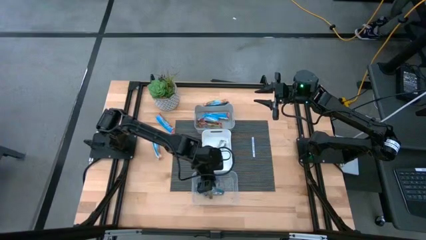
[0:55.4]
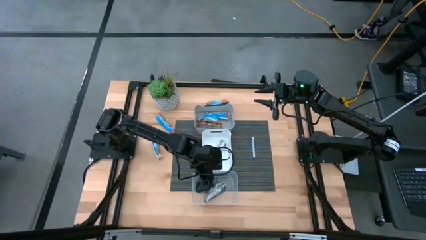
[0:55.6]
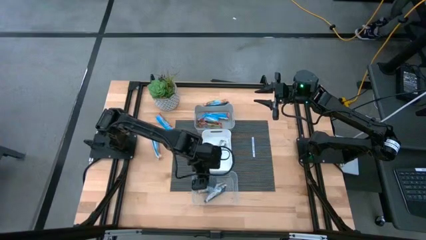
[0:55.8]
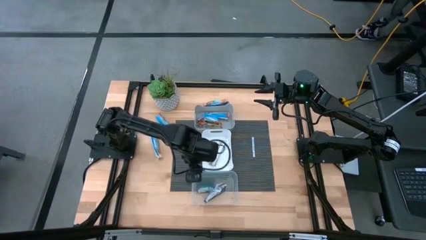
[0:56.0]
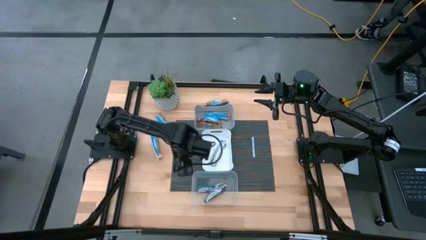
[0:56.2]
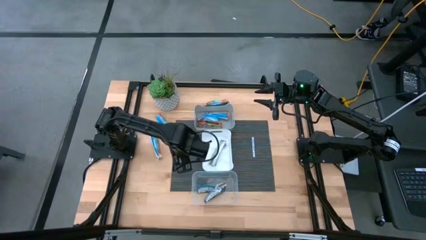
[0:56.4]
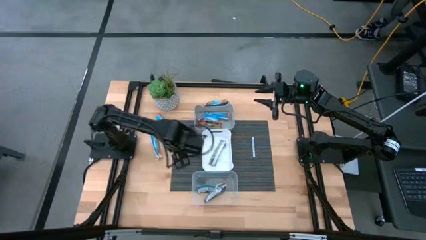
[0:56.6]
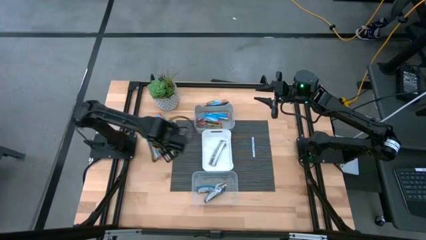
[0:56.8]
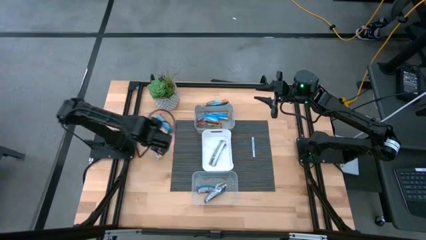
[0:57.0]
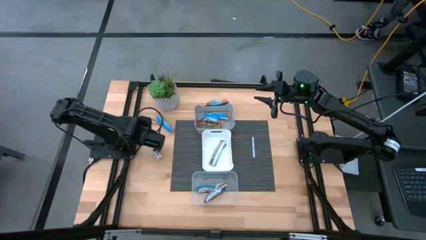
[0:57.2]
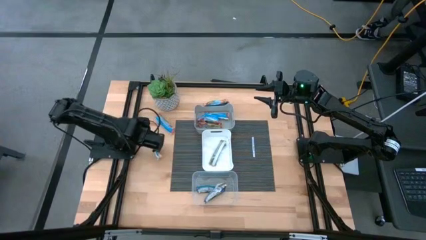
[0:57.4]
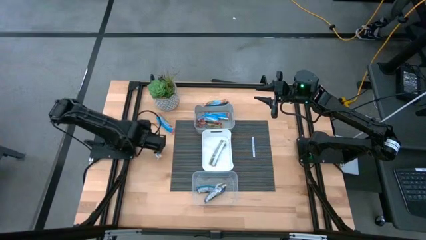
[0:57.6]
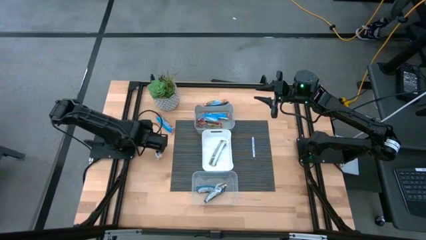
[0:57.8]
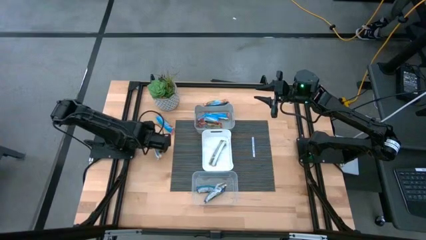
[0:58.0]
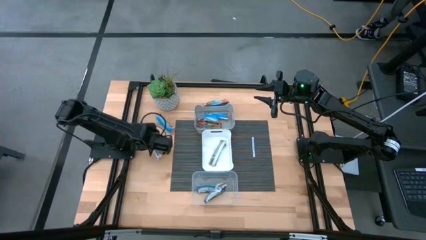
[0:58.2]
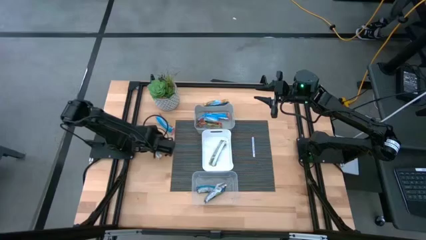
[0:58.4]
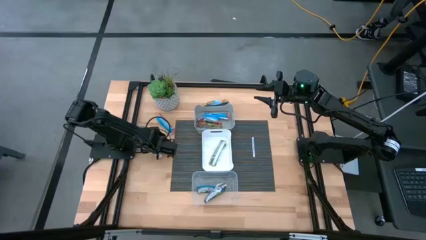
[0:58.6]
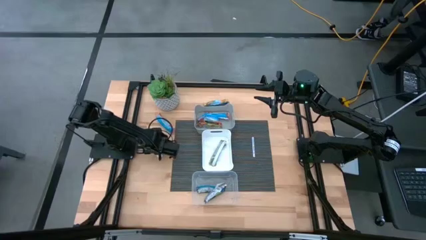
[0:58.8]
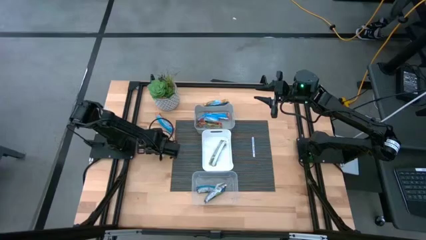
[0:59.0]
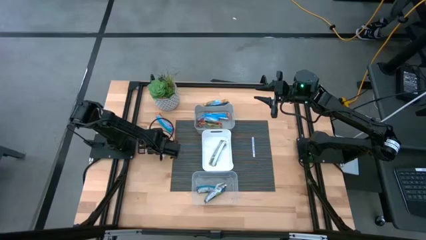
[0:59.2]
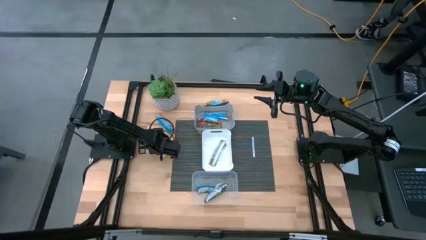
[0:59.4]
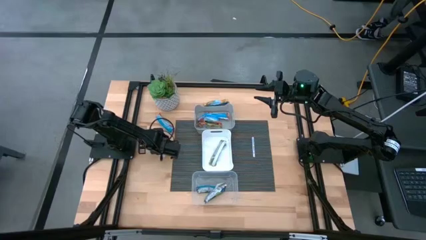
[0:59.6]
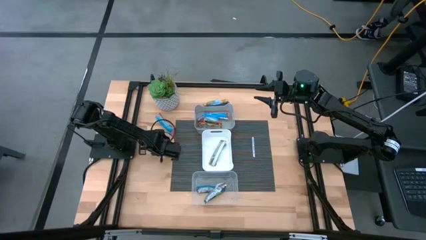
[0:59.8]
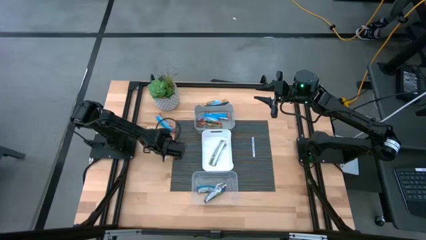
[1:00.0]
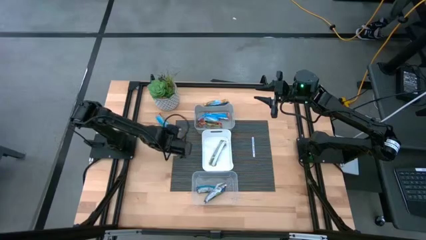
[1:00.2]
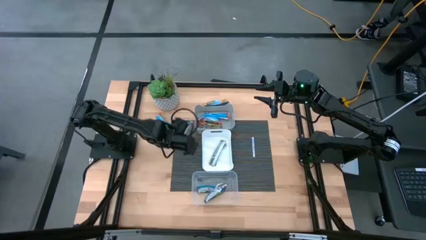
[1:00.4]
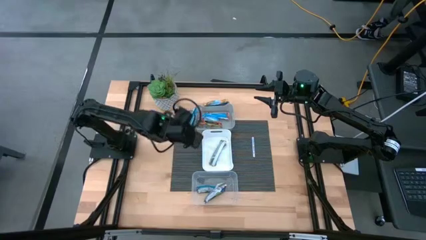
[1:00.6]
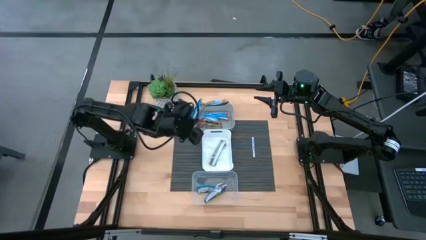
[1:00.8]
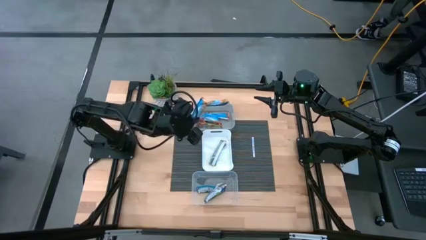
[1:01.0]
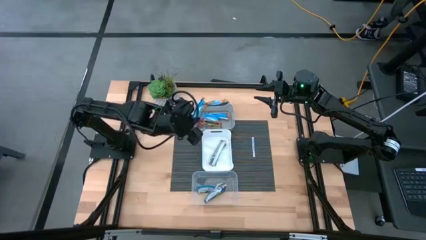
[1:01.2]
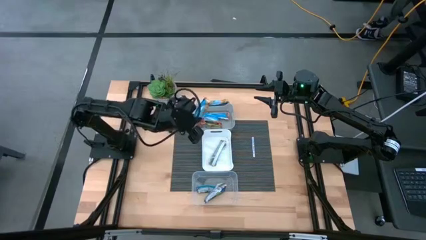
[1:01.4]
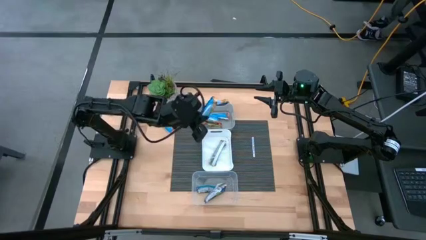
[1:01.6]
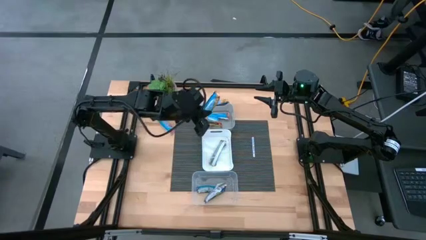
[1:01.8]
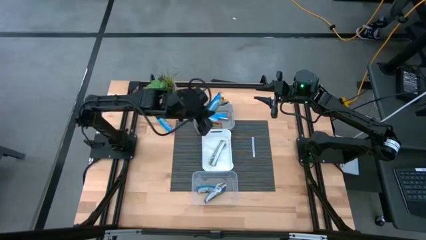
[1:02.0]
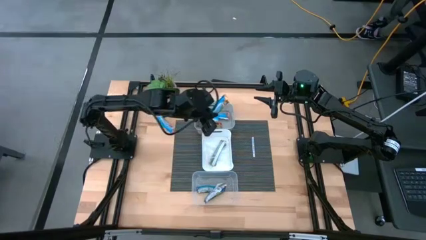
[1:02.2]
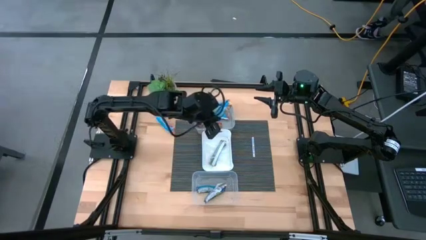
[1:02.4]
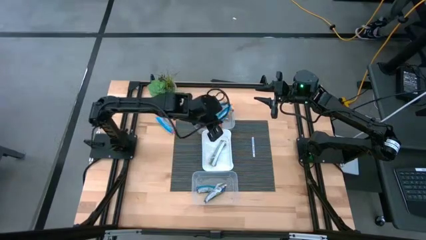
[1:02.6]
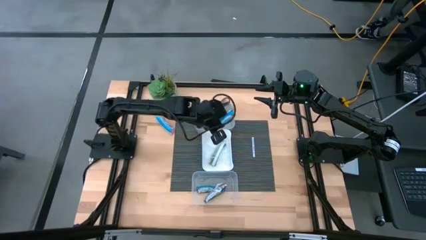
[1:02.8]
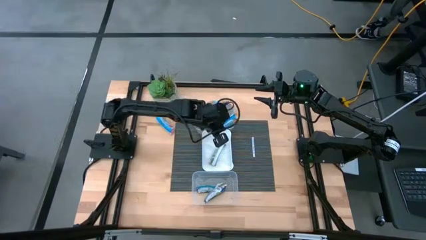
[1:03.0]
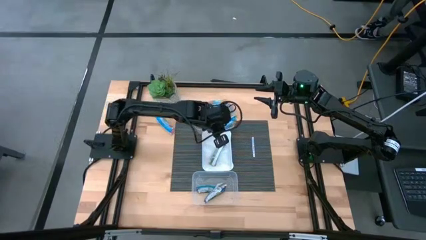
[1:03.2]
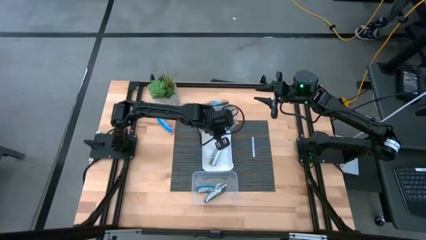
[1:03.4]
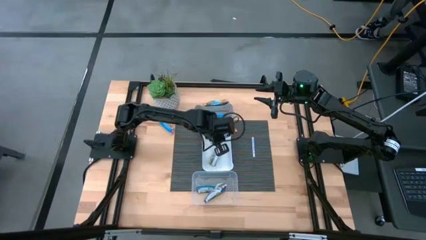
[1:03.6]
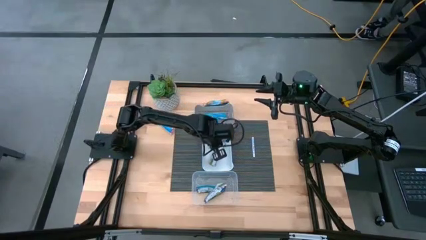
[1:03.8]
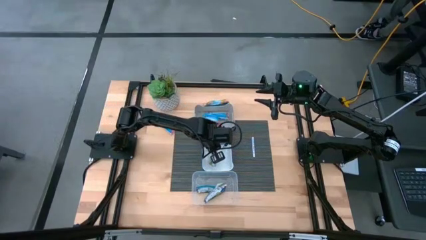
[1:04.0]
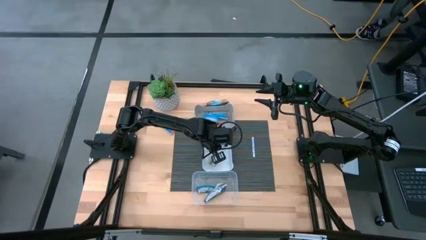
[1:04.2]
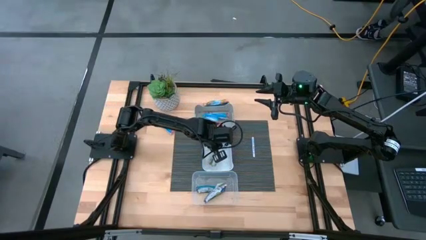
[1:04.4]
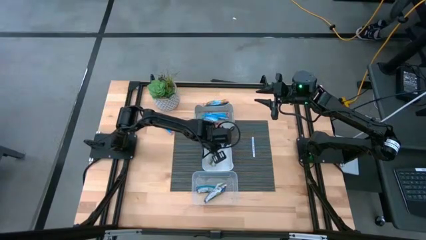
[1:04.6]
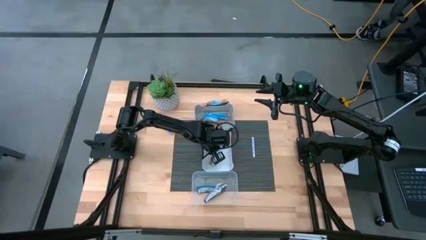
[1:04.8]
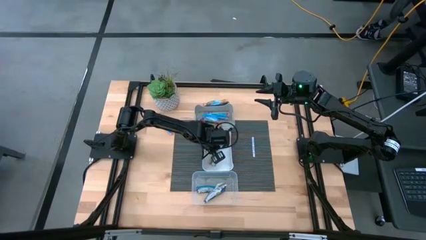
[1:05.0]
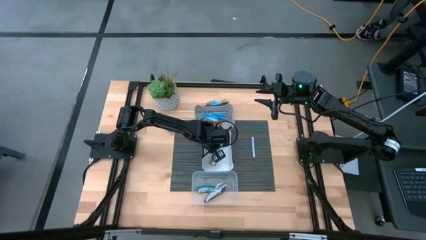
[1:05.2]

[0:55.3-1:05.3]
Task: Pick and place Granola Bars by type
Put the bottom orange granola bar into the white bin

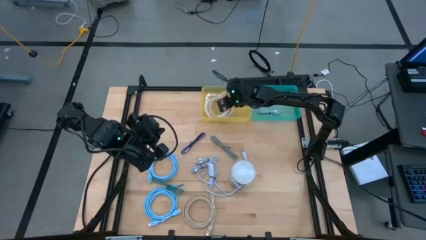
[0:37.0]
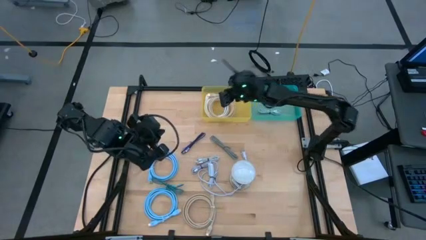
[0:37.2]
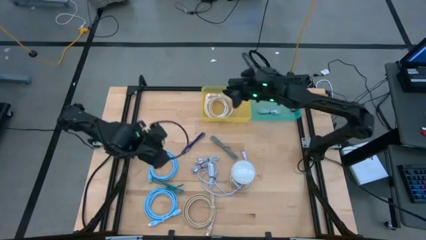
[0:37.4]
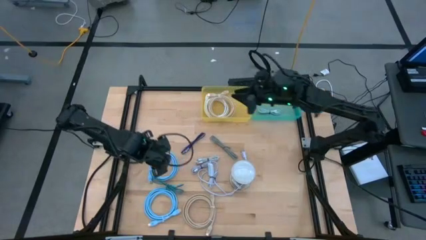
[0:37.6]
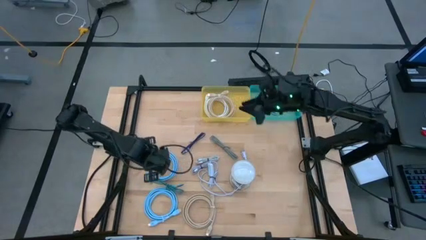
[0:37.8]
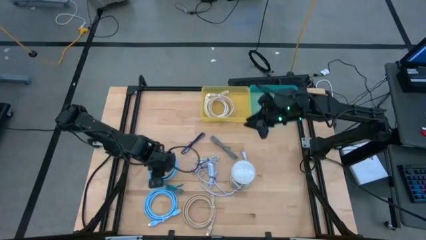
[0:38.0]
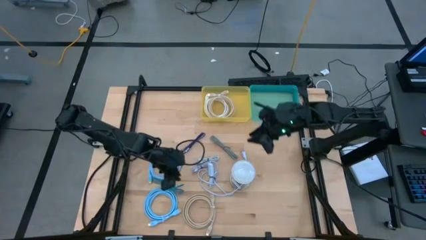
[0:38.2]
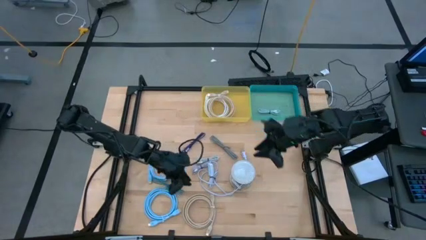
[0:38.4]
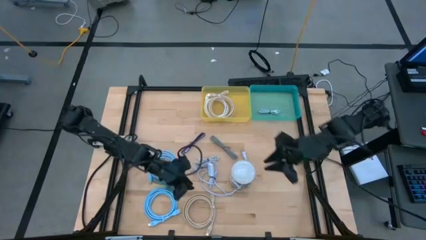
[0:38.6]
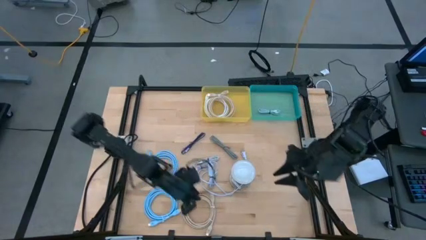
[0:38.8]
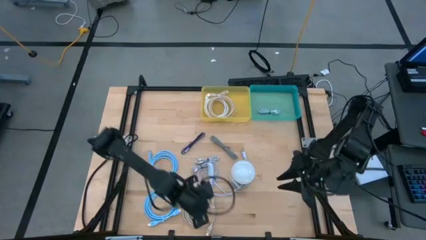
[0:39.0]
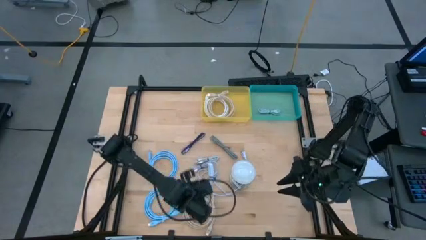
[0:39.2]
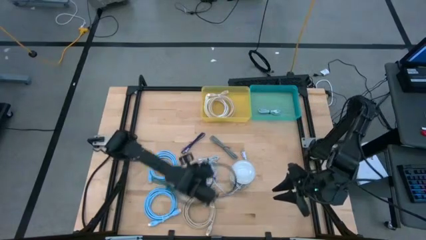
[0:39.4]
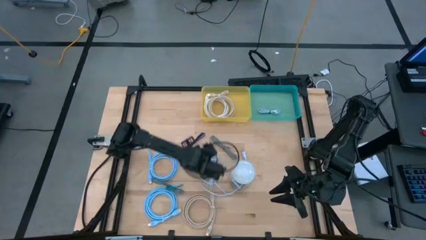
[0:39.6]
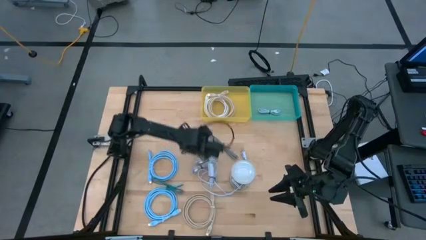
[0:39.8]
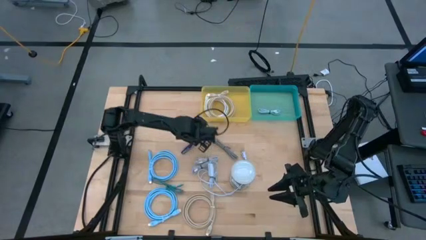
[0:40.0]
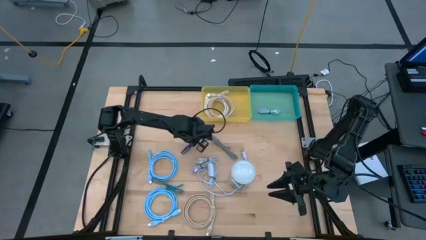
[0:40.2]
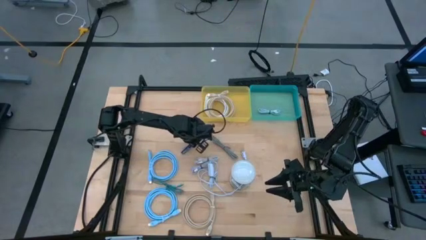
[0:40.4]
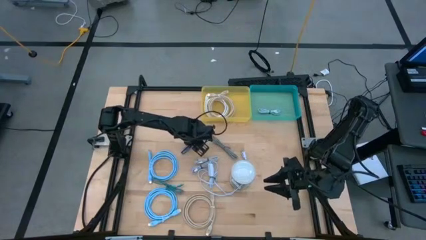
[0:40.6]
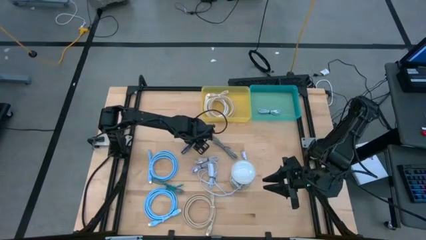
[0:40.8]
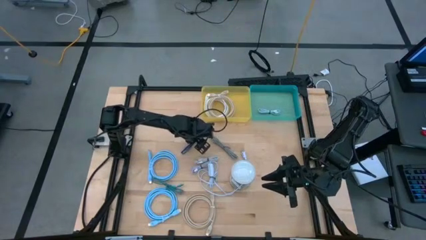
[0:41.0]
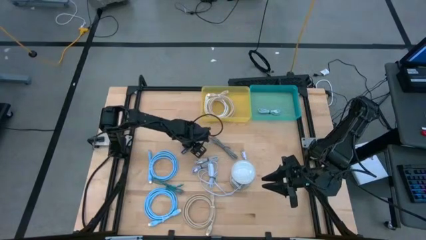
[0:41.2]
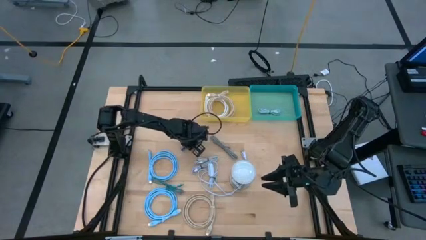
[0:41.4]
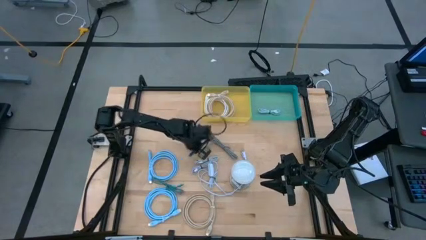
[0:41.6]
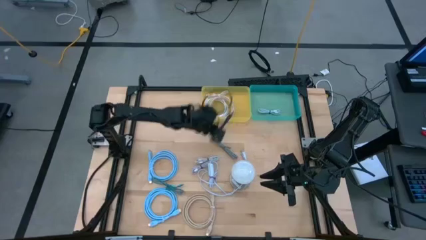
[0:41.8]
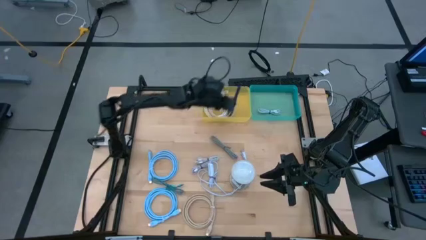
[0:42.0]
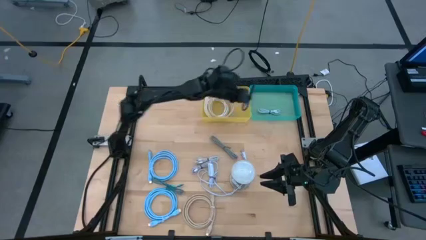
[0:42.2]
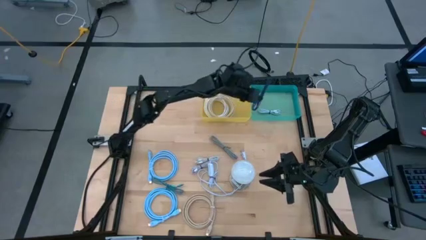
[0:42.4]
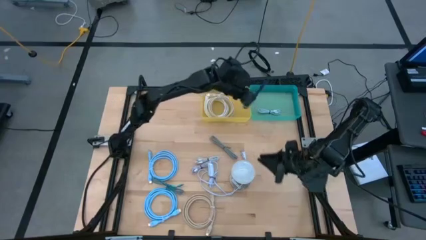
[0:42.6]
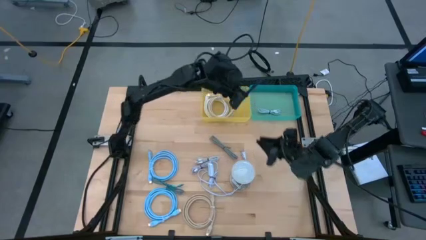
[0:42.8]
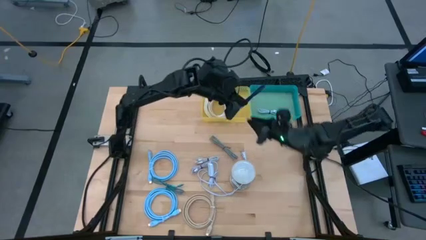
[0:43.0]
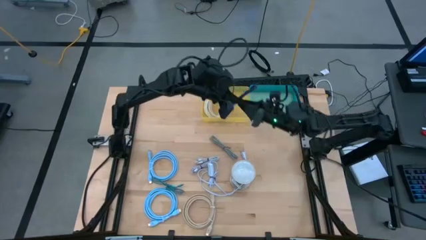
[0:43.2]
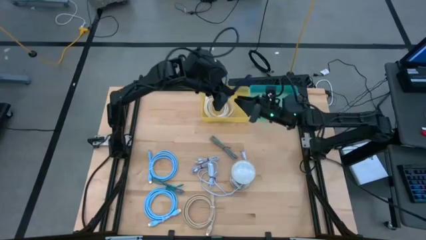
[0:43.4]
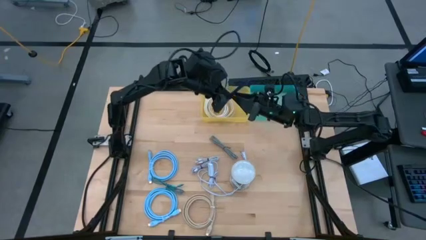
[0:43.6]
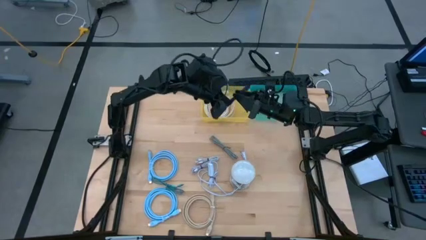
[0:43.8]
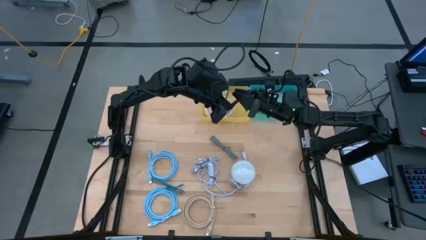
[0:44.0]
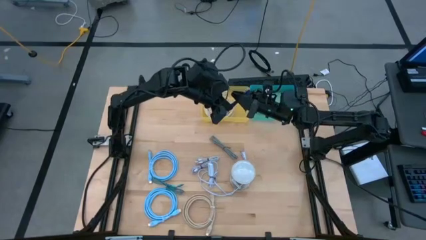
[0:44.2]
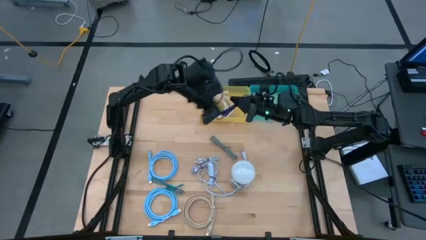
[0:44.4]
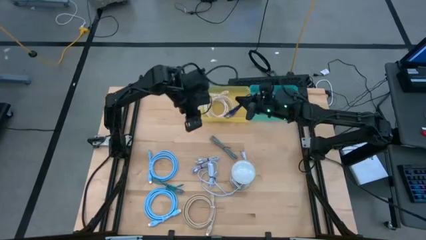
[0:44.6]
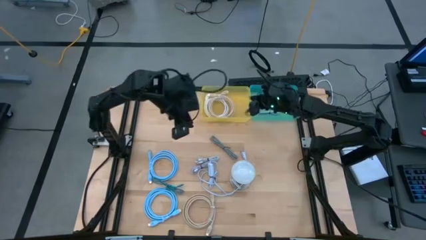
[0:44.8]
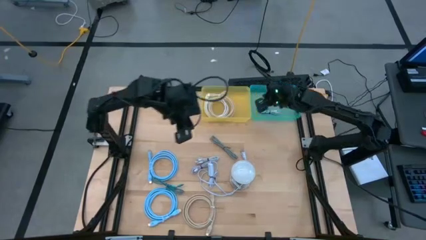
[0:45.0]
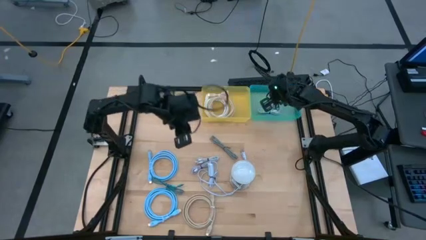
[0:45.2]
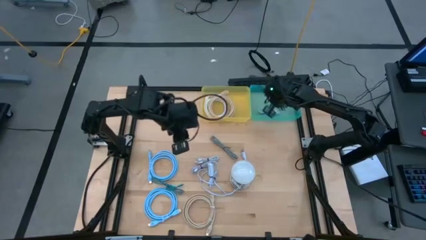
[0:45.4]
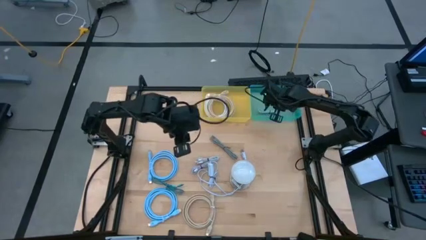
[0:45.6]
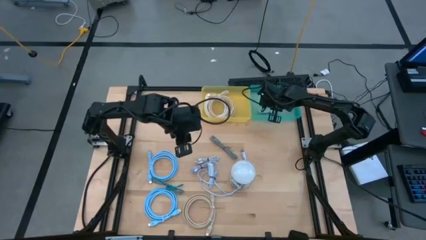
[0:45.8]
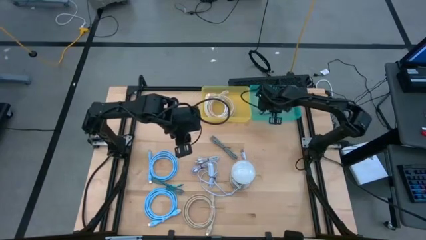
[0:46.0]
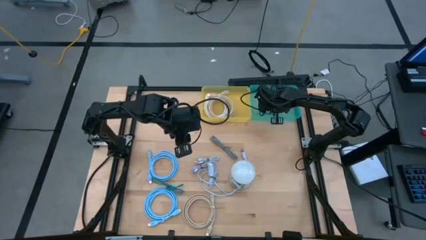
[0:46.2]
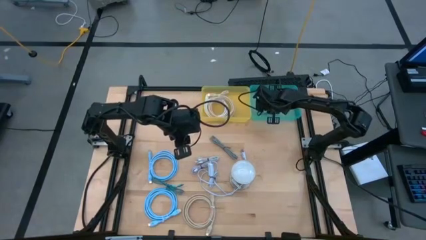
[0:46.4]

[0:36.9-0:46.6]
Task: Pick & Place USB Port
Put the blue and purple charger cable into the green bin
